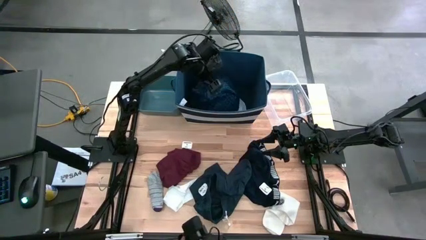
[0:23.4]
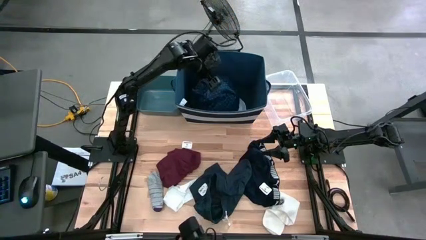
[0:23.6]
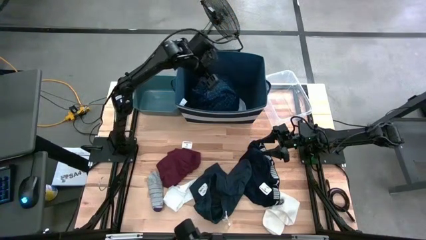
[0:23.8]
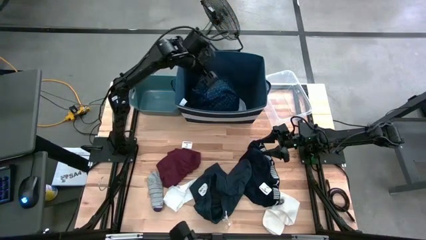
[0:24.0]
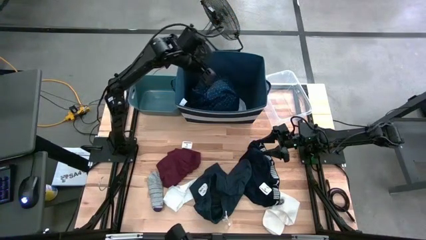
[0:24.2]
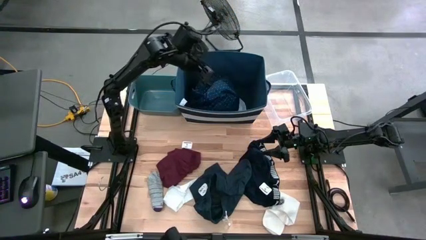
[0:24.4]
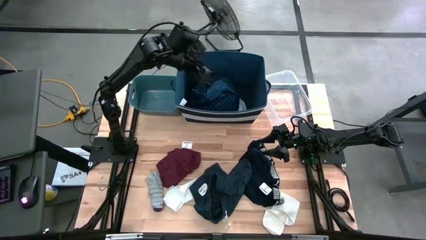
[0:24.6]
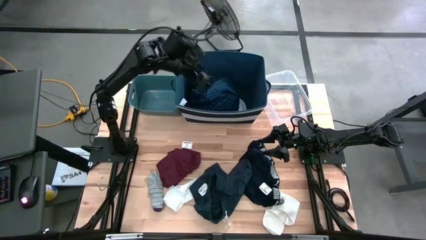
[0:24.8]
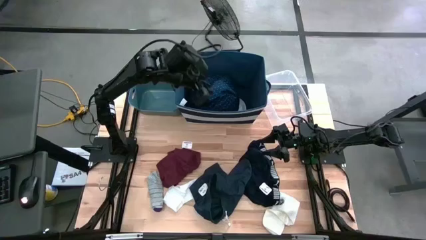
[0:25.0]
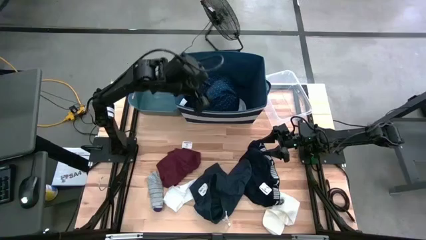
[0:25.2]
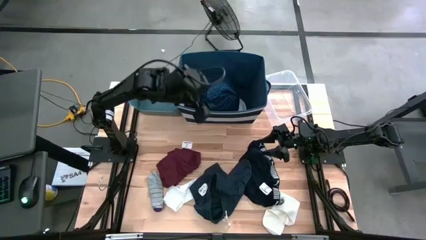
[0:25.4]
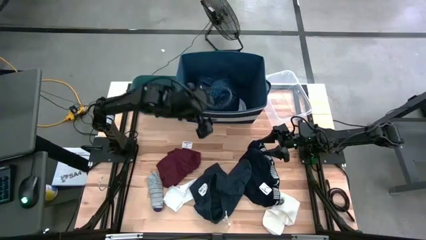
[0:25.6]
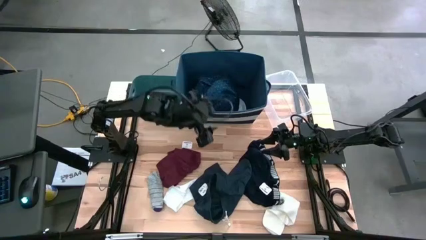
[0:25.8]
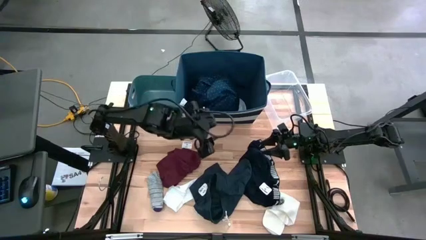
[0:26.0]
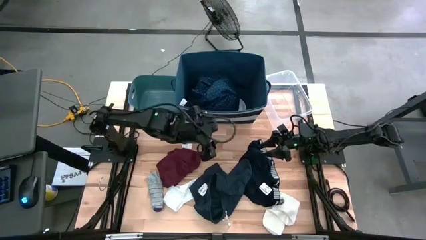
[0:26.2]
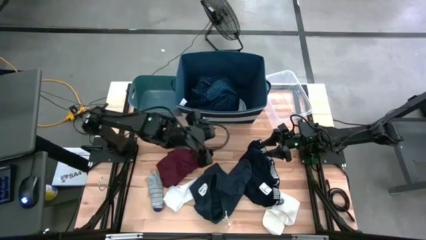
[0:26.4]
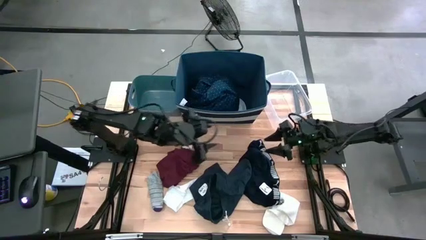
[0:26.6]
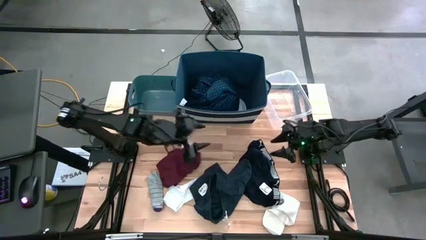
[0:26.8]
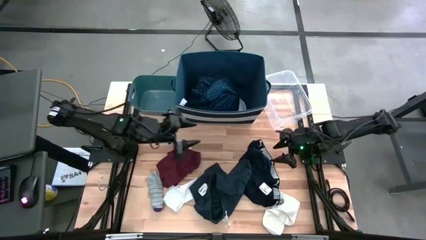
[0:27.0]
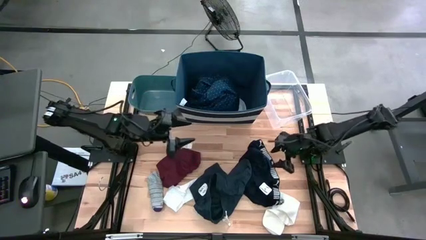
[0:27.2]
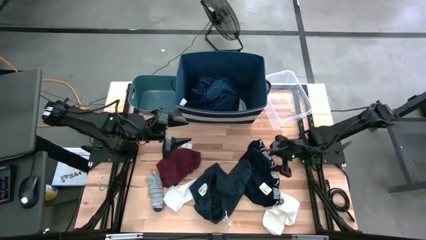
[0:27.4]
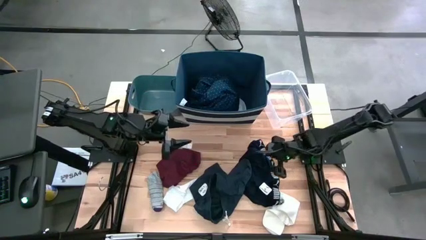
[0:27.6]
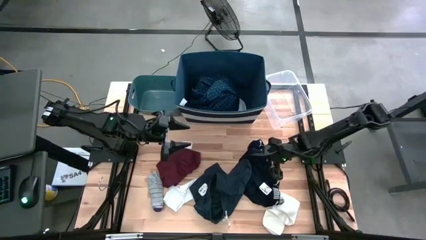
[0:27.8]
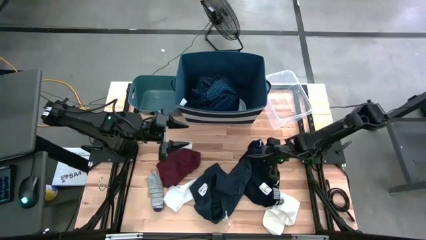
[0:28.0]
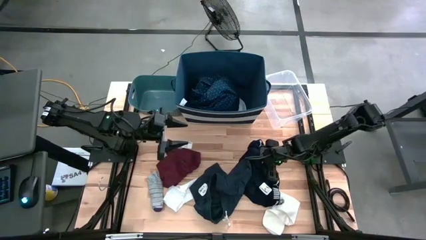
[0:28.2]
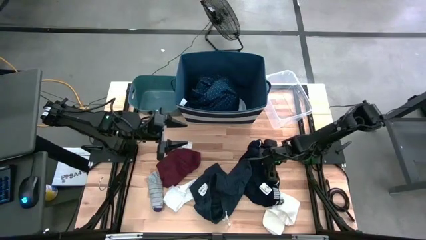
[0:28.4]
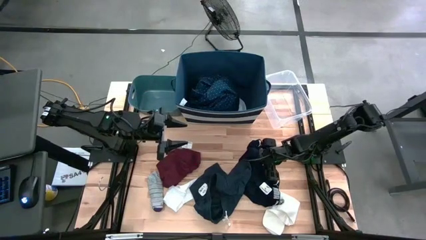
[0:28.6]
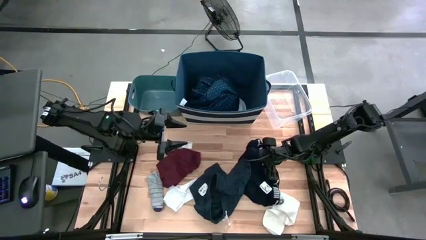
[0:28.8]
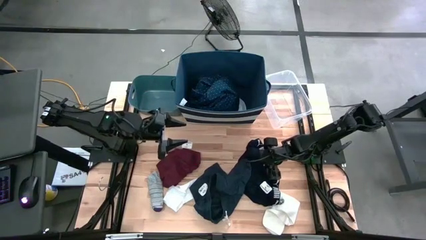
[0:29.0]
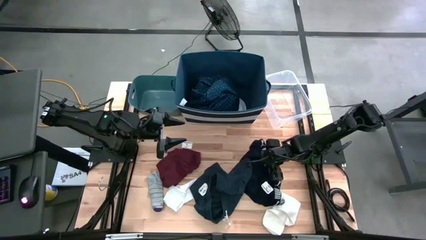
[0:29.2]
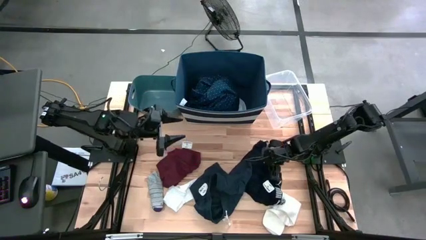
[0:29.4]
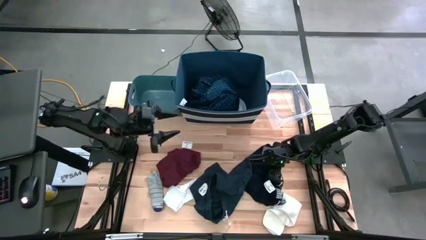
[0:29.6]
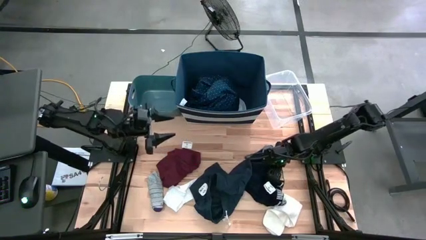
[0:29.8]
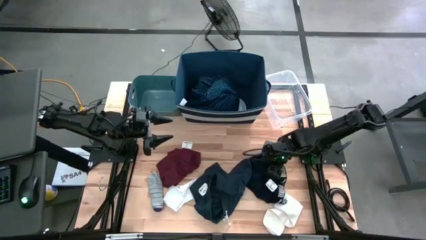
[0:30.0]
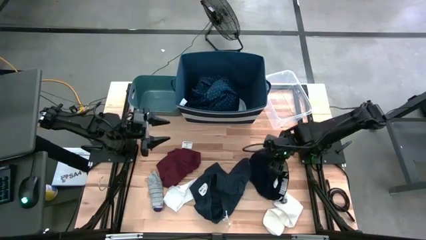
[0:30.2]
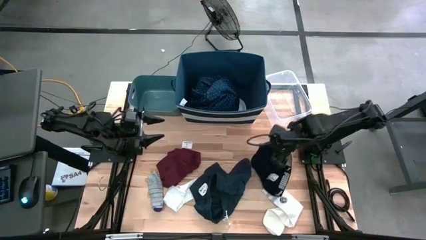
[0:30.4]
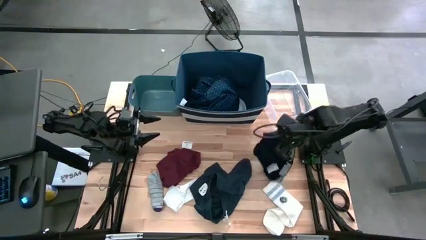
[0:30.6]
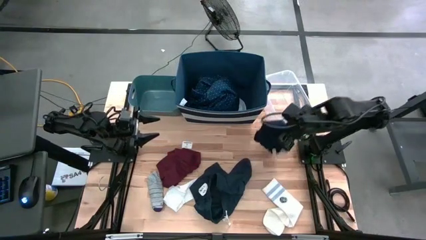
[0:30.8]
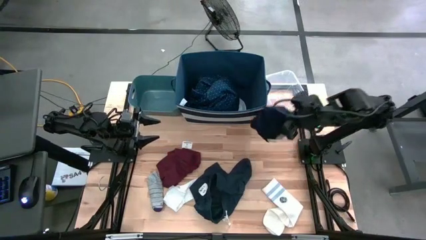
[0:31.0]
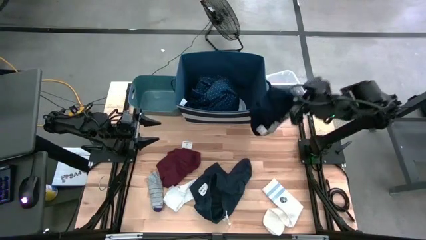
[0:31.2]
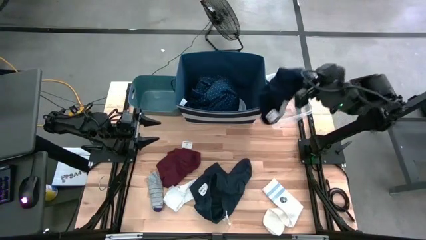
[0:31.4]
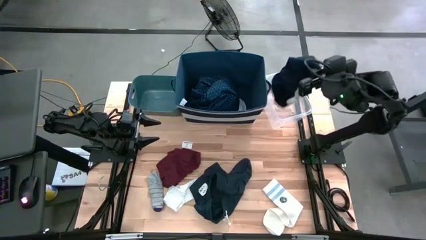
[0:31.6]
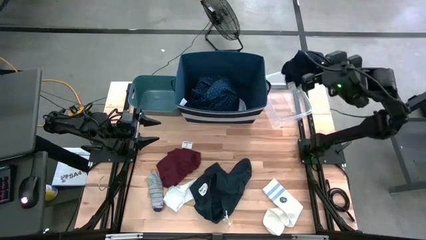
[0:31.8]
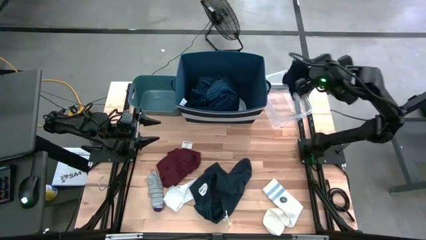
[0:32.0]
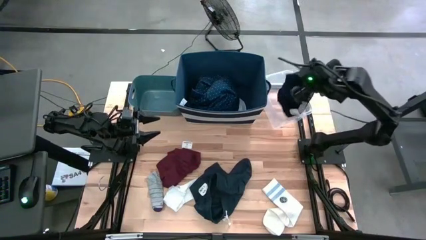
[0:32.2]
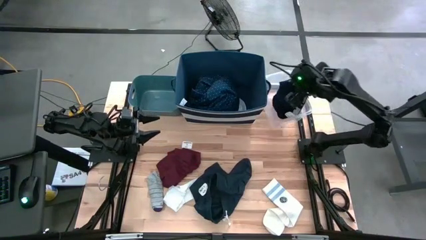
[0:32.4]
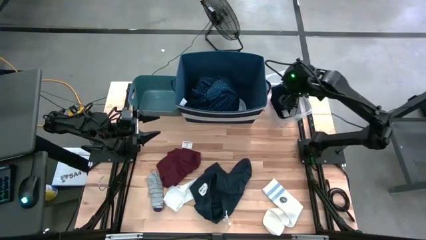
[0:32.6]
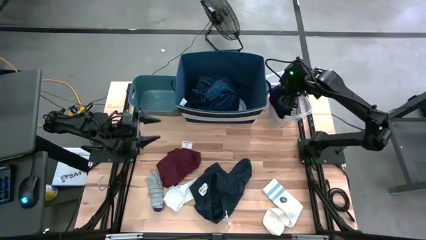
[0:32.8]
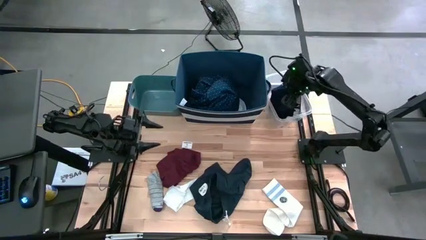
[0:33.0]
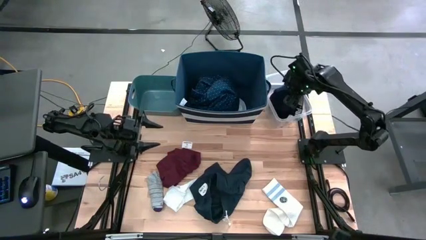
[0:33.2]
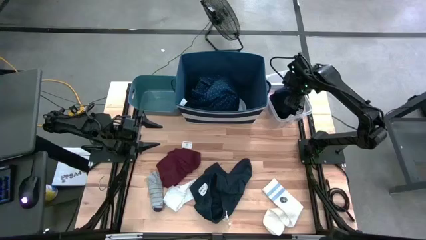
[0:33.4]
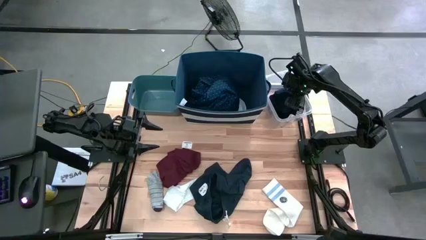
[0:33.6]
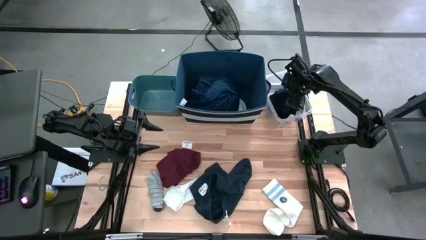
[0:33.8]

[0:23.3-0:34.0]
Task: Pick & Place Cloths
Put the black and white underwear into the transparent bin

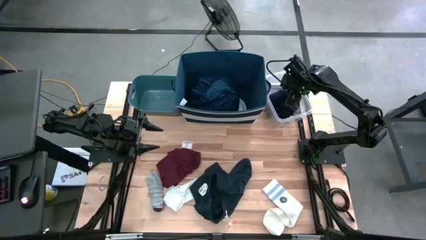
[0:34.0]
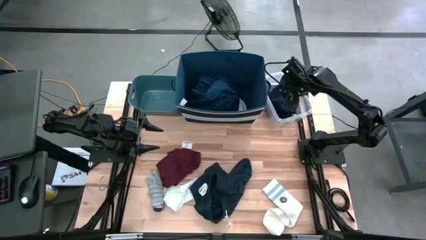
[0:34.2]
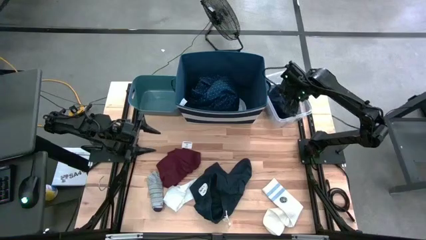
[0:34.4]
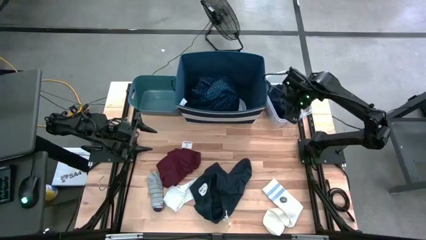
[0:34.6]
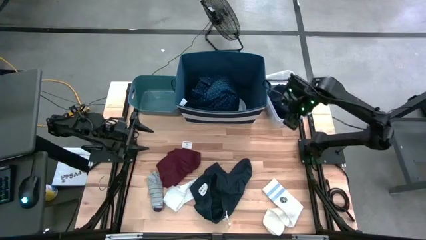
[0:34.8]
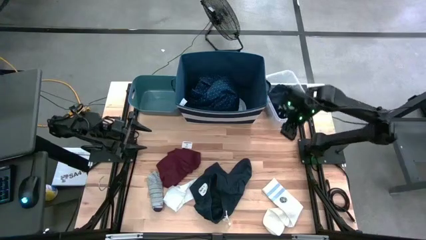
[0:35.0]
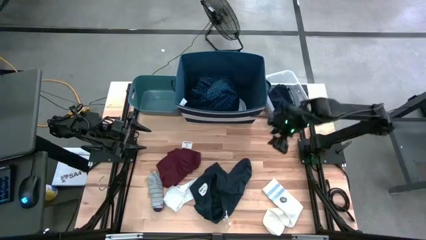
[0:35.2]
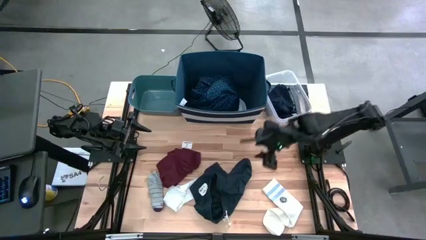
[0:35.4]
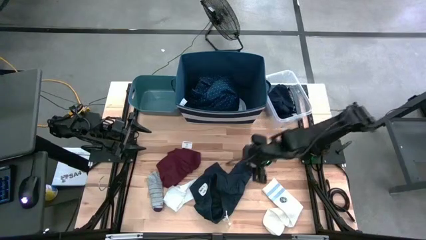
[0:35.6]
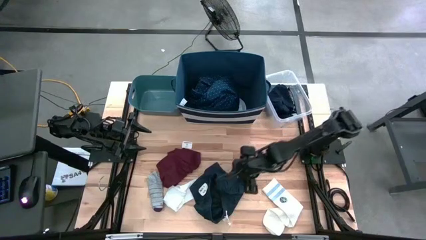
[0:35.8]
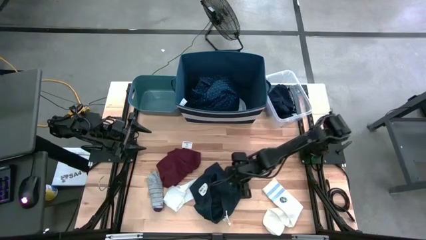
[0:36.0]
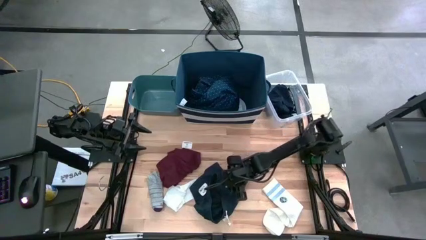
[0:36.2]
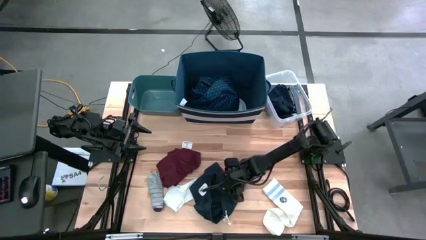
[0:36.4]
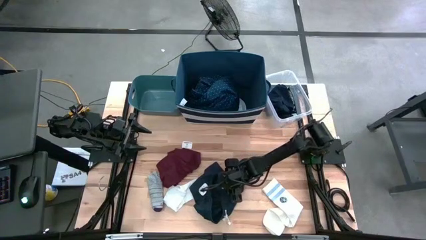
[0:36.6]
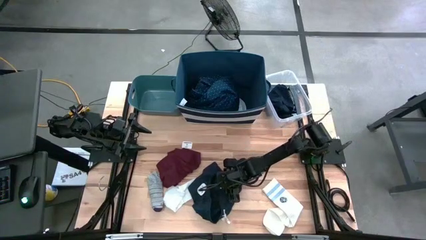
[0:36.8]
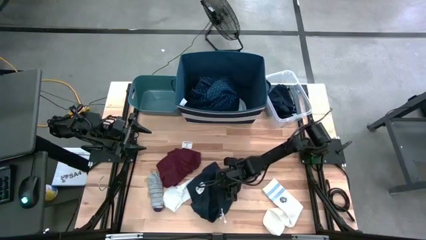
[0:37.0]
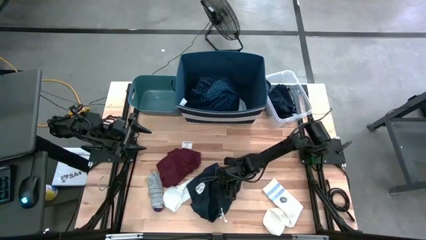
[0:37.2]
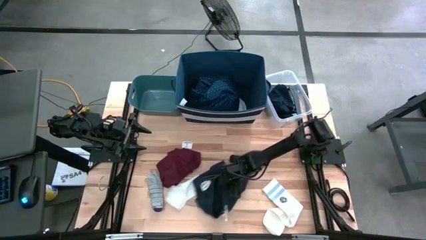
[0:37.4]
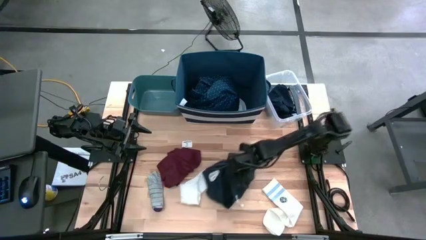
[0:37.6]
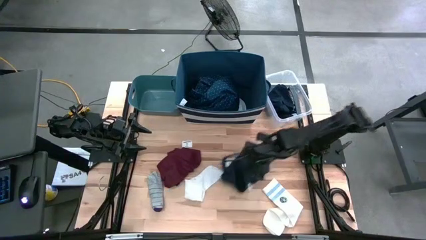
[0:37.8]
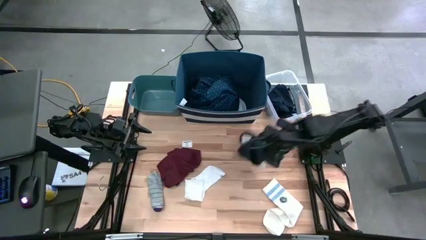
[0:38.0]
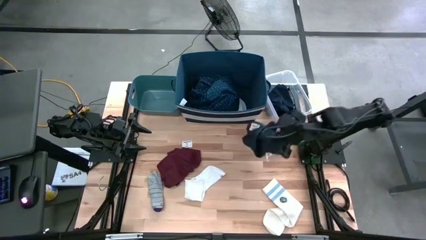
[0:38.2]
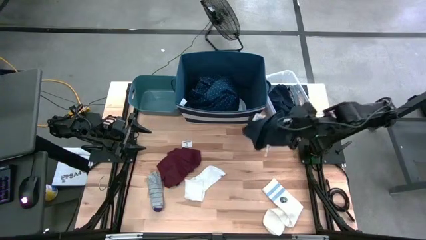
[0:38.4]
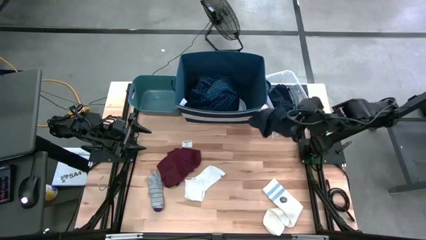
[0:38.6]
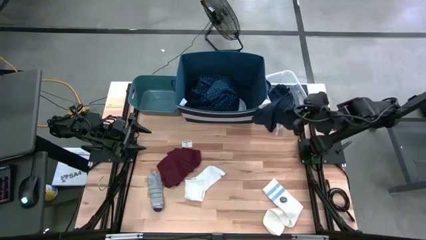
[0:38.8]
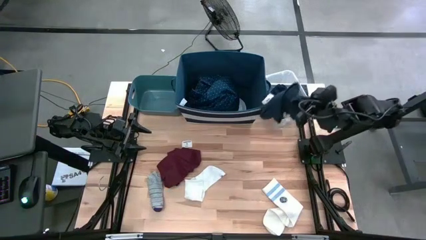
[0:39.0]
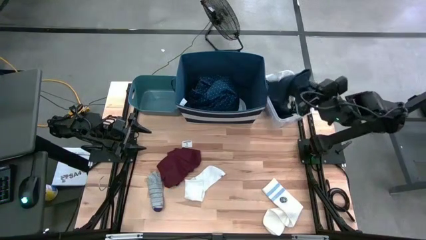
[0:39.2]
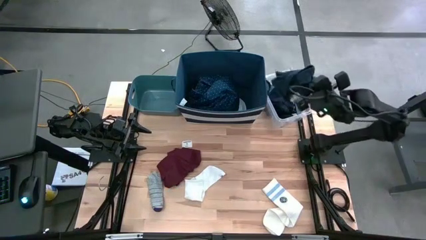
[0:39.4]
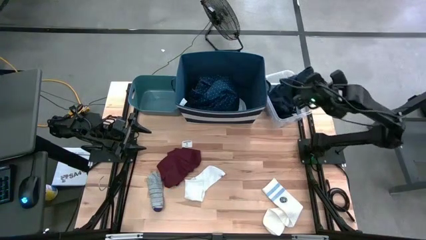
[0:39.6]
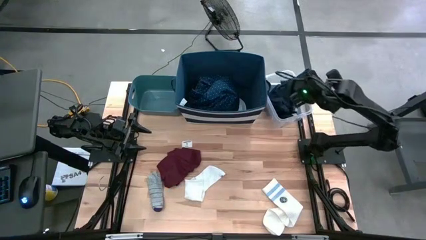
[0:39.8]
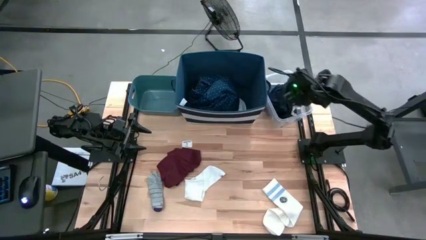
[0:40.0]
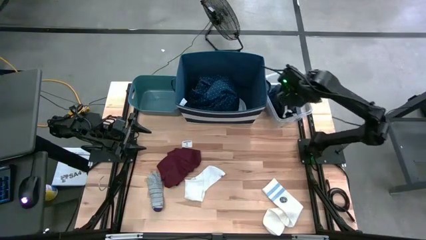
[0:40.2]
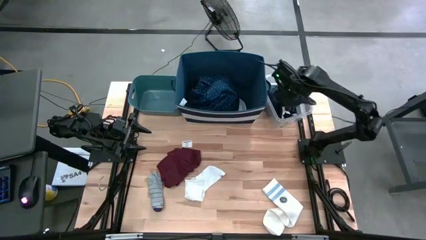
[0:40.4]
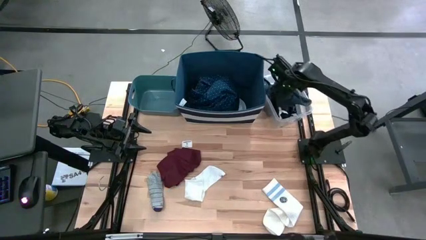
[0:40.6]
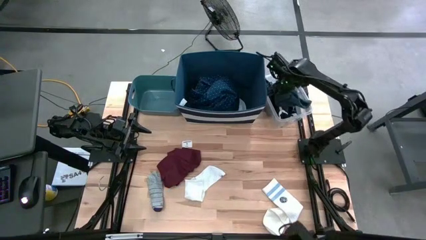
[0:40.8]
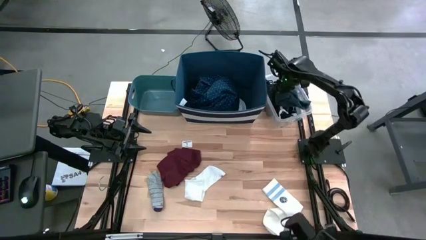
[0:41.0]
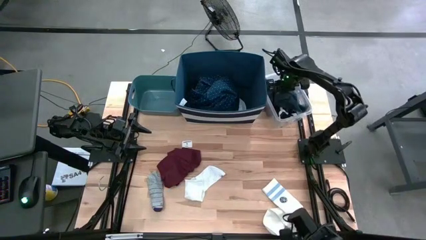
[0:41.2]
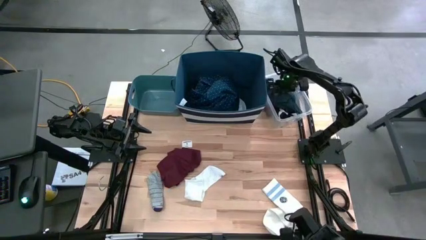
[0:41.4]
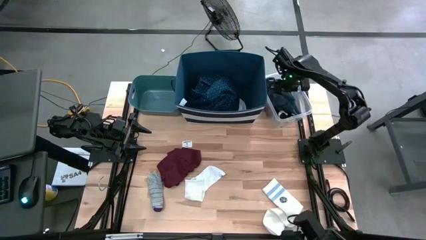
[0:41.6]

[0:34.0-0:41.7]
Put the blue underwear into the transparent bin
